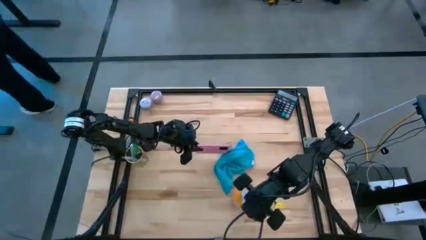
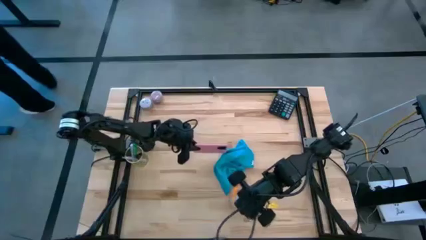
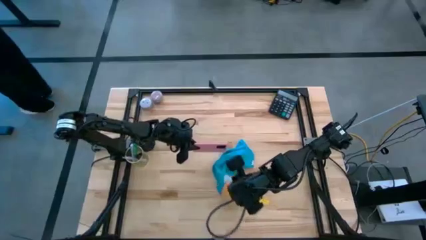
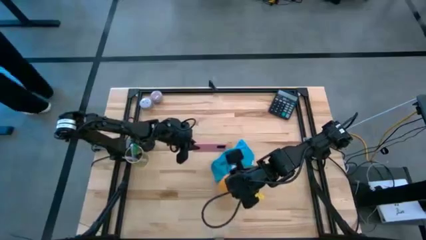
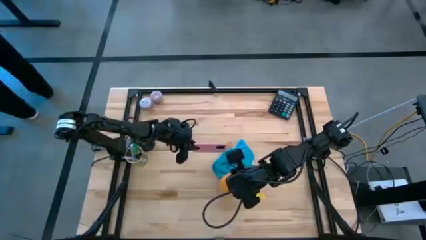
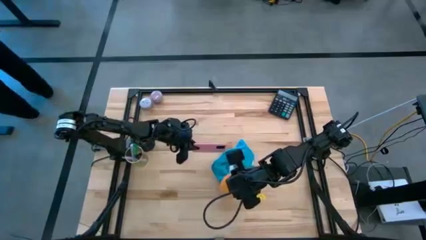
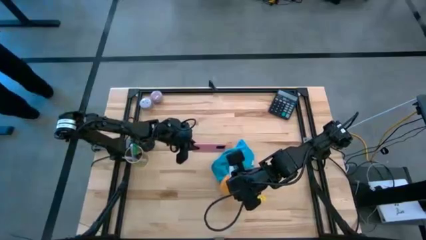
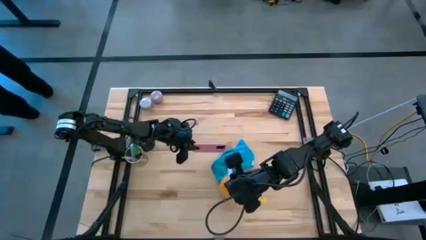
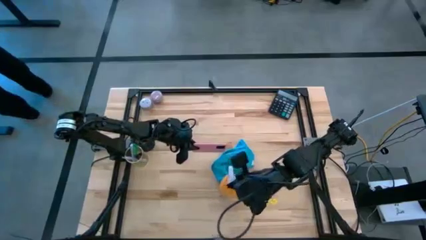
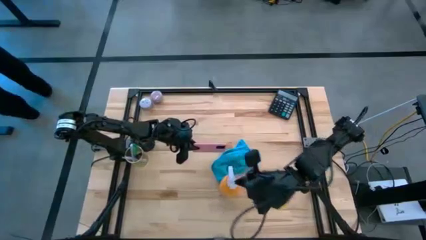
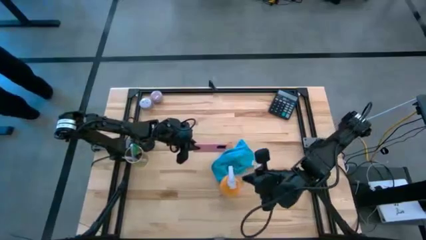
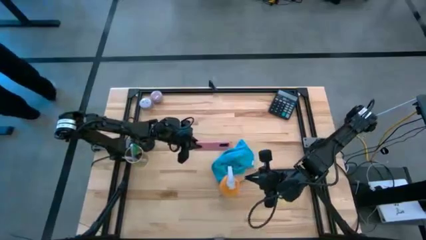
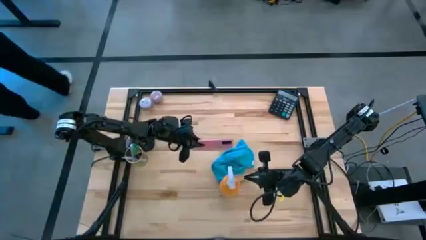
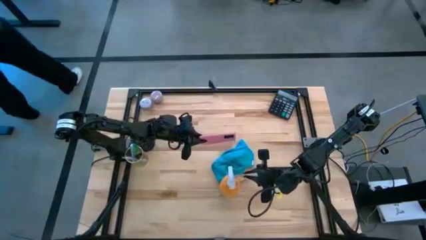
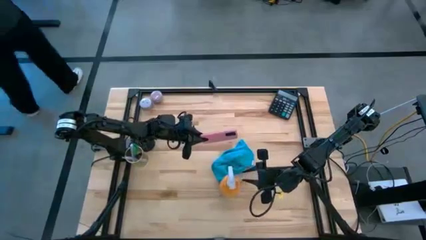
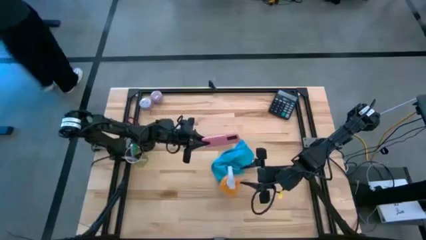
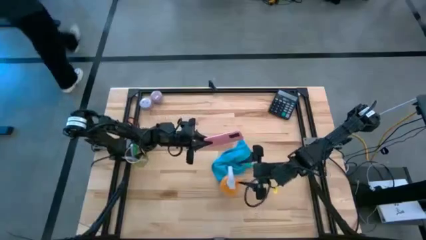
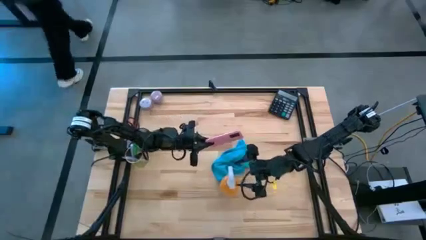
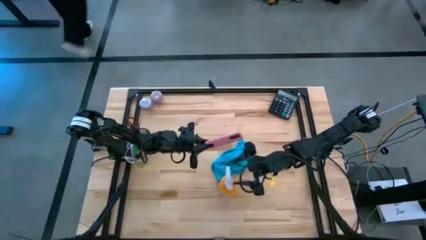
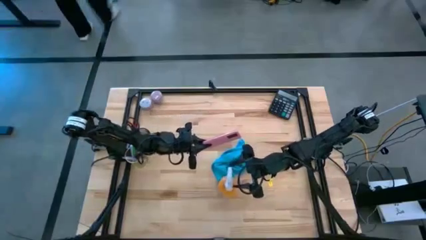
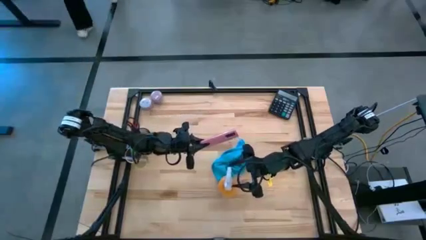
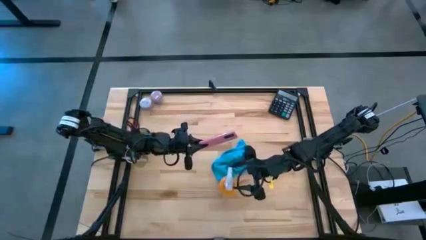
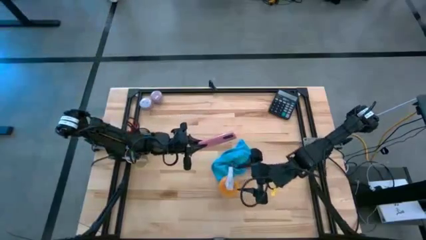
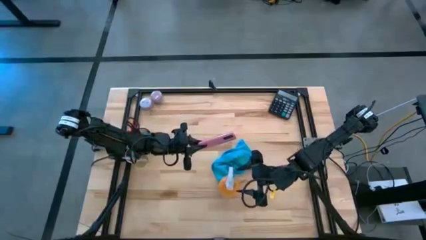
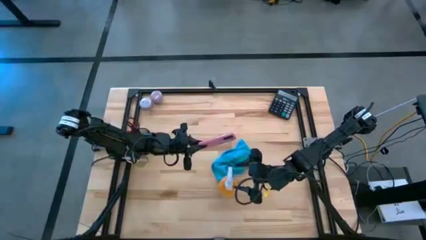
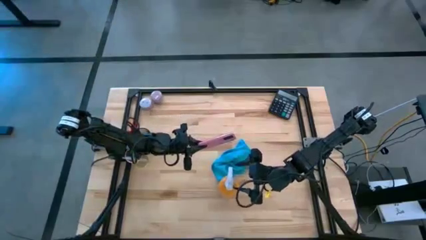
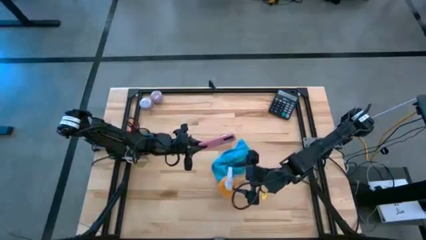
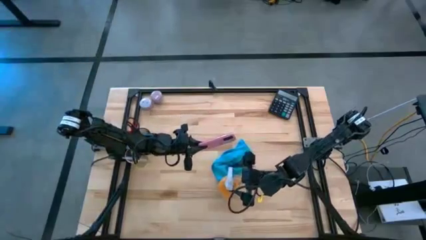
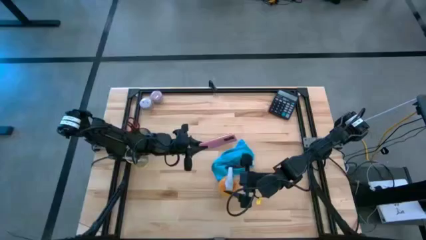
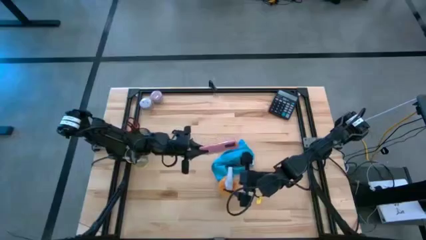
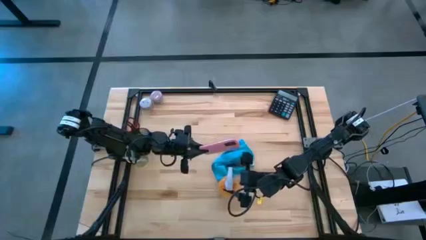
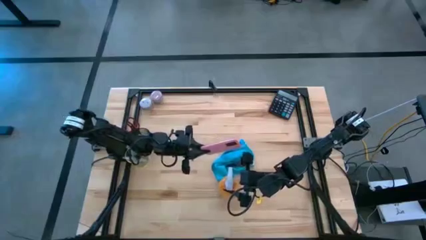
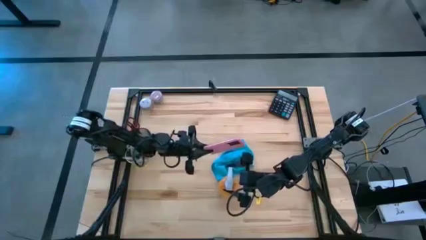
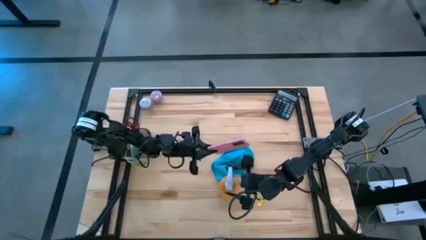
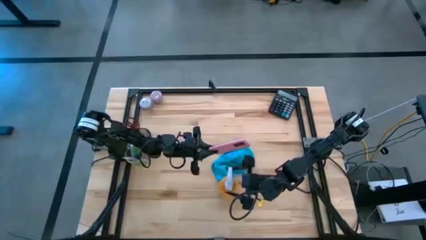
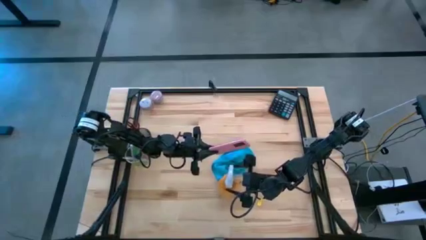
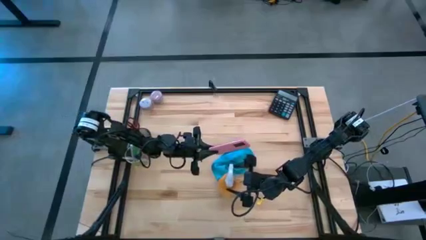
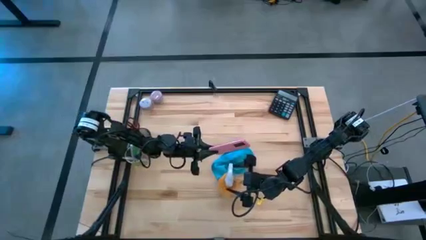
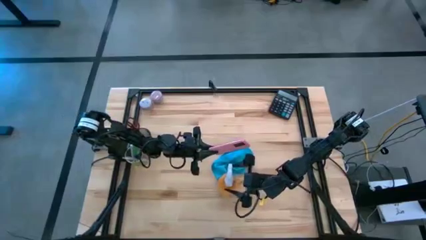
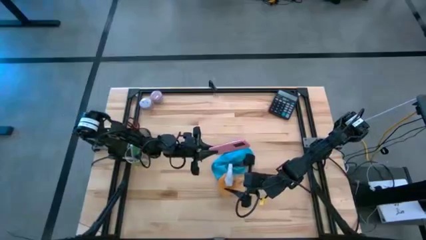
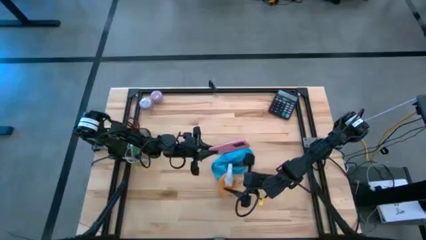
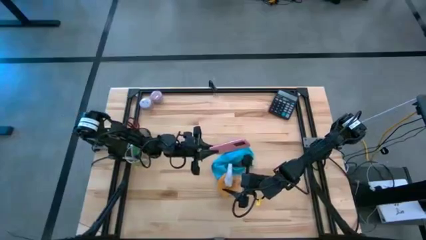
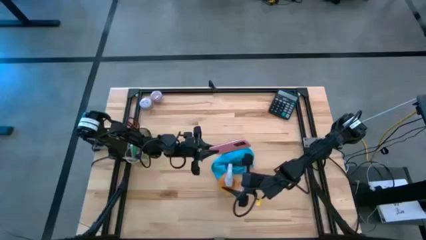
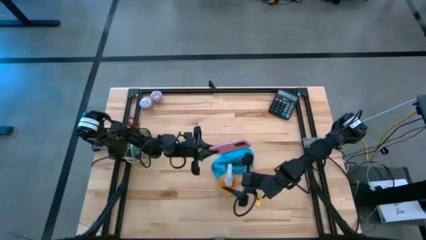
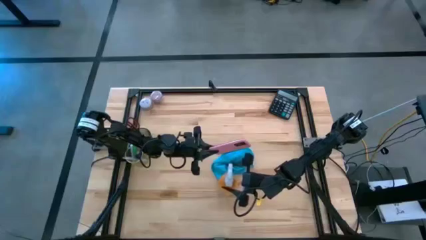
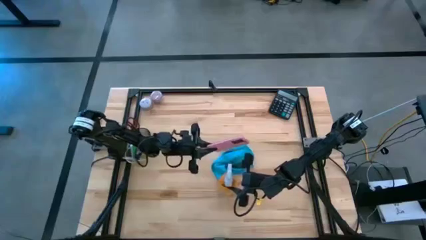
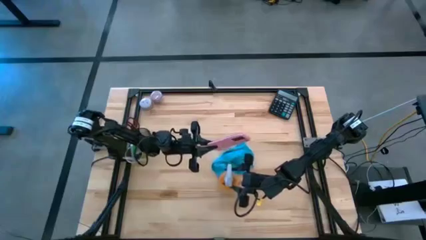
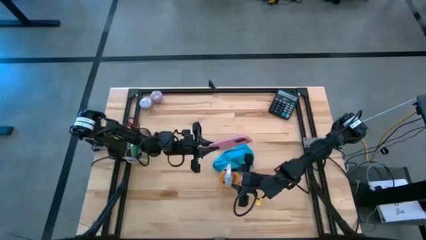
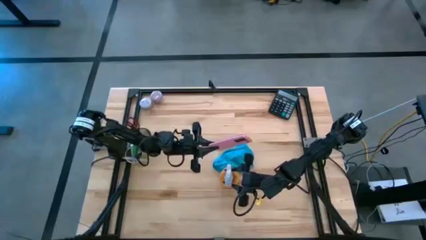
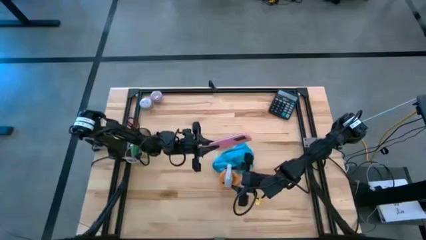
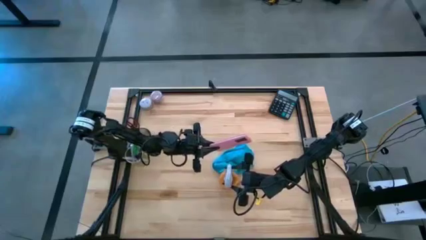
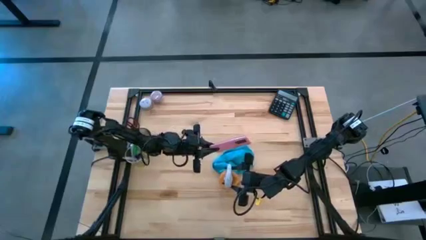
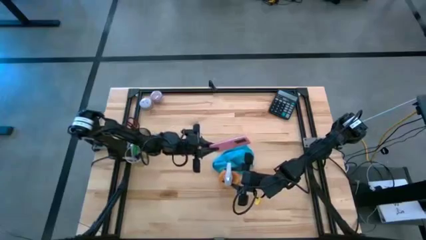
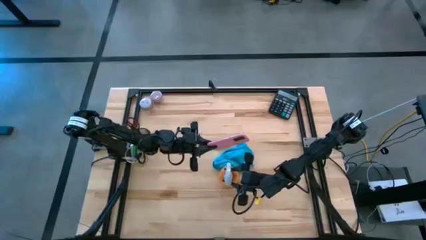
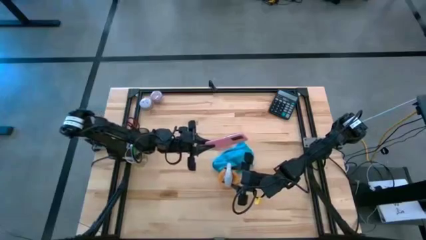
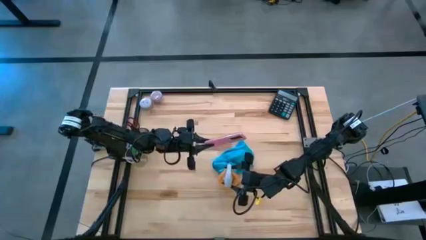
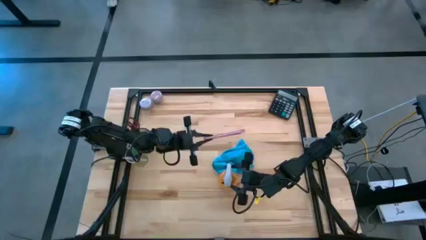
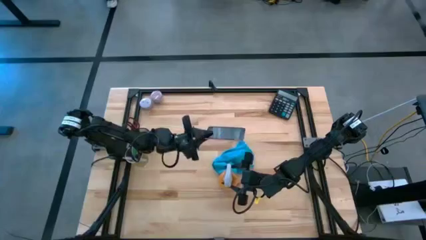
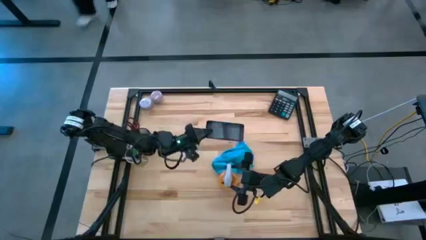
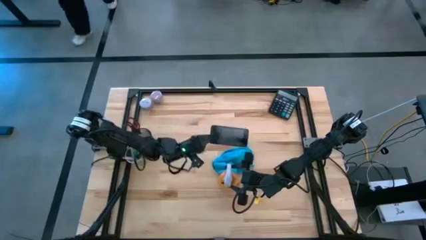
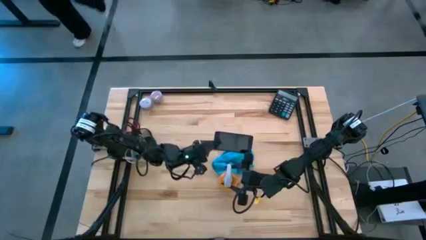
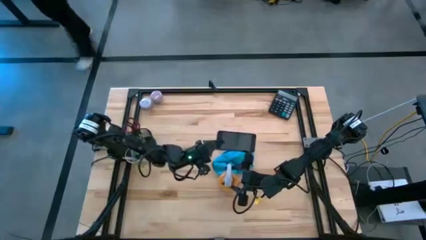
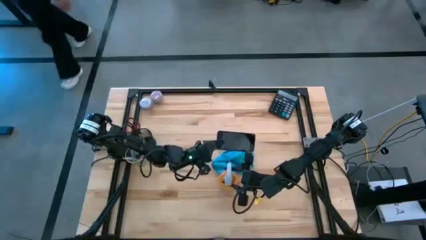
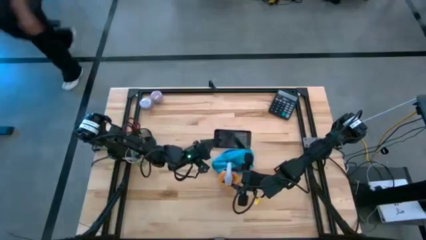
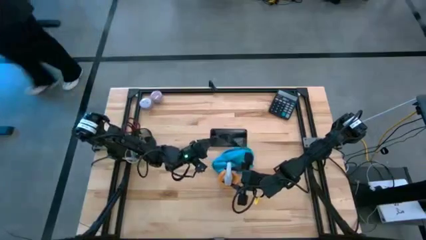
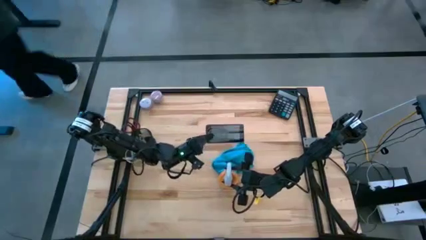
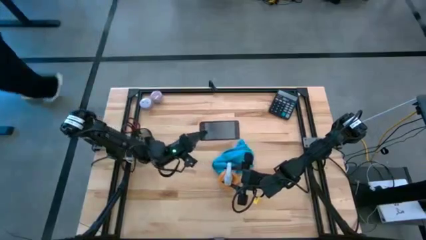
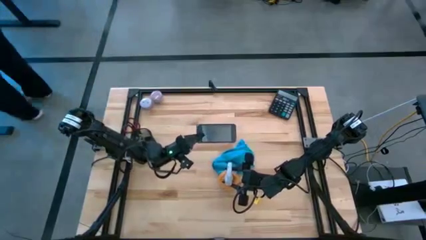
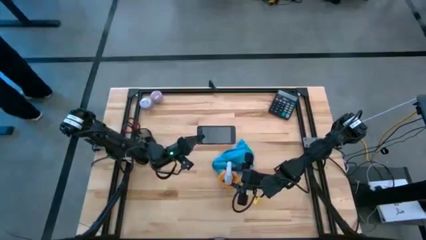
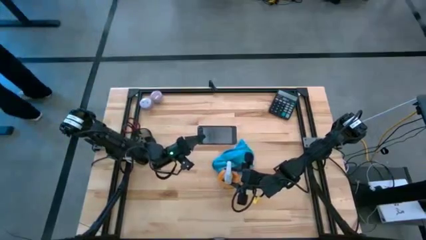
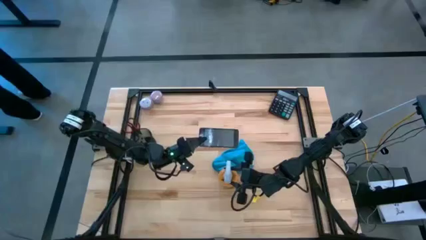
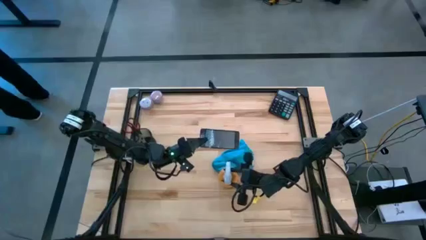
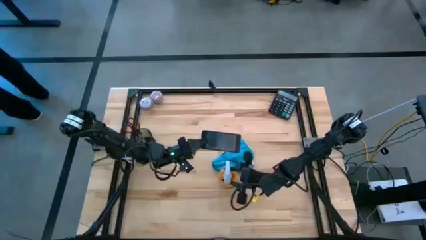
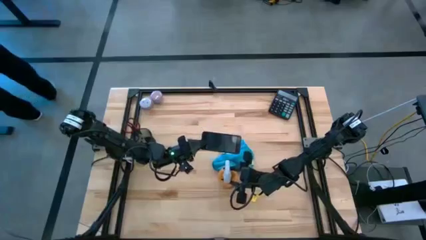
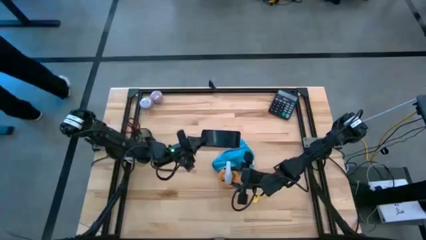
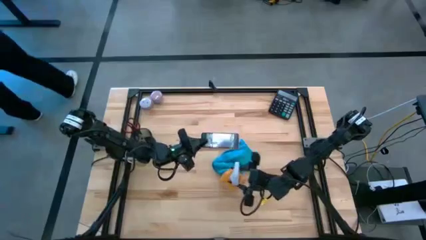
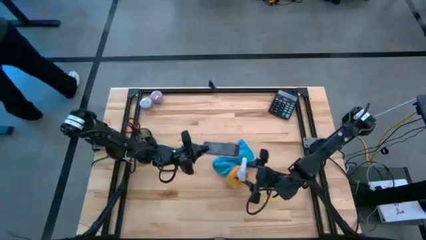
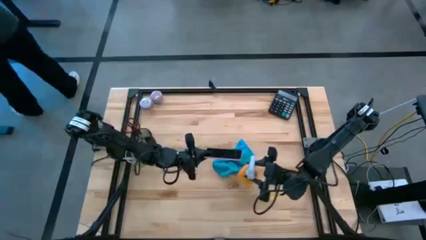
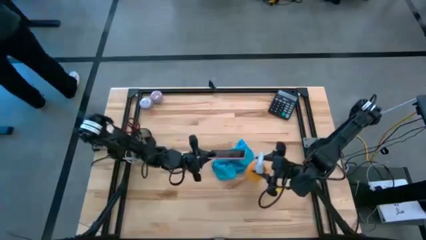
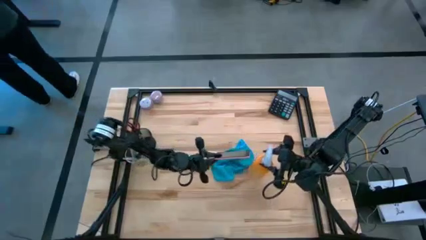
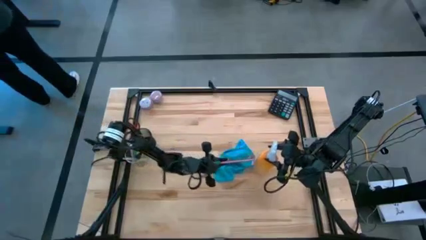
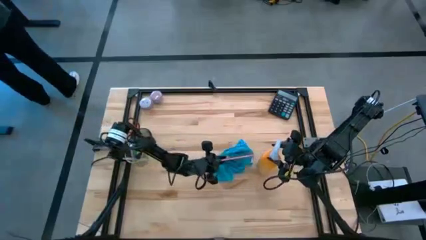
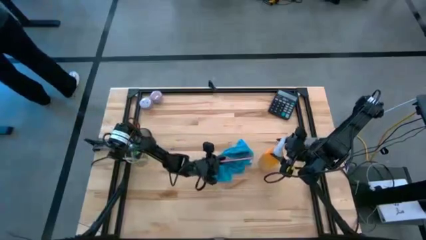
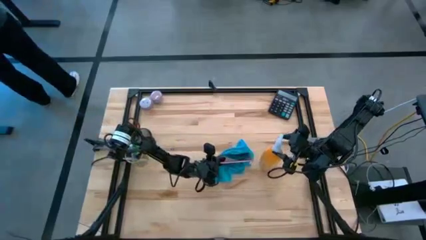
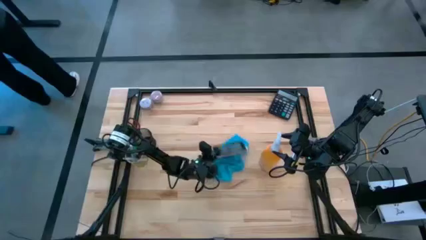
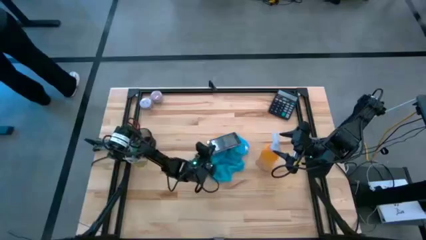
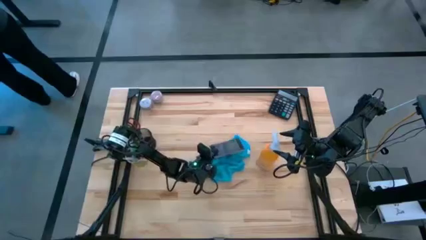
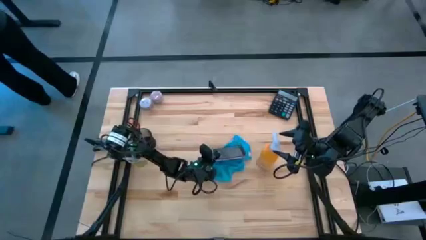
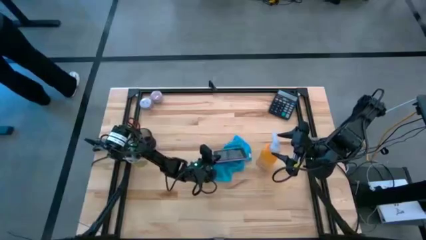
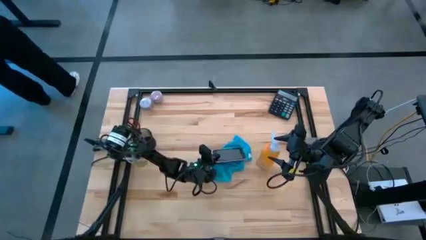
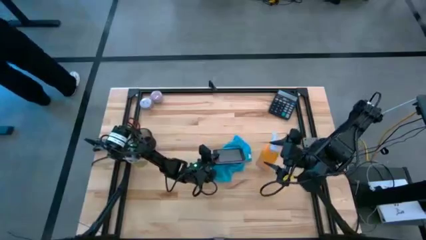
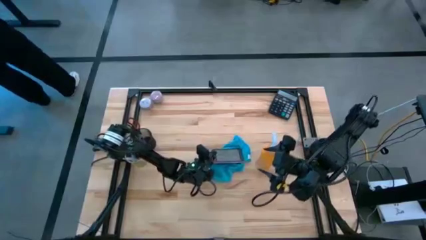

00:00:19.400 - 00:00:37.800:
Task: Apply microfiber cloth
Spray the pink cellphone with the orange spray bottle
